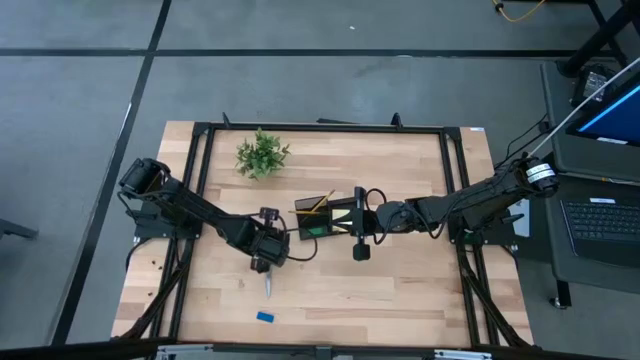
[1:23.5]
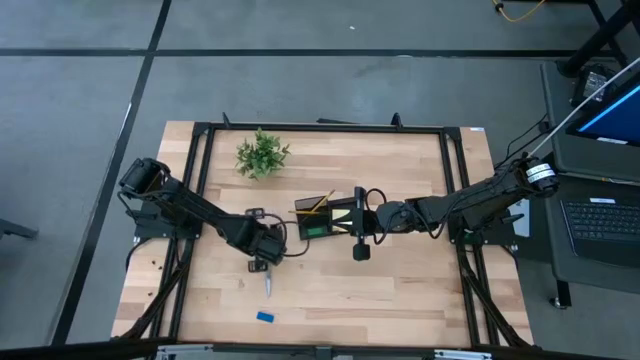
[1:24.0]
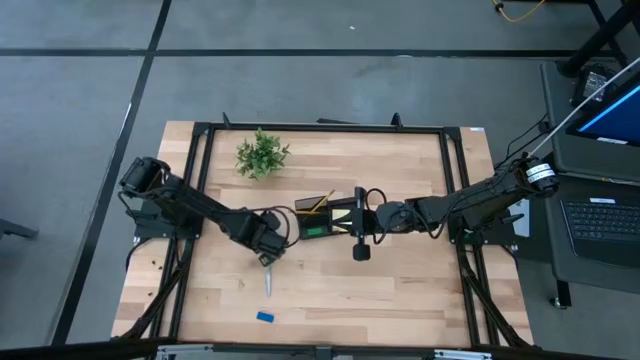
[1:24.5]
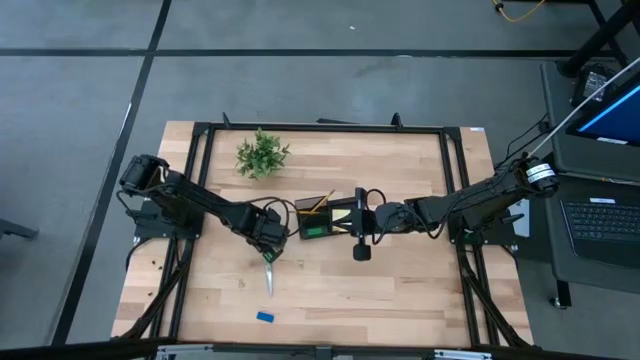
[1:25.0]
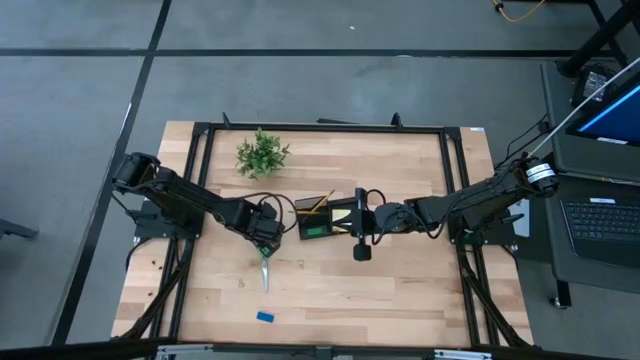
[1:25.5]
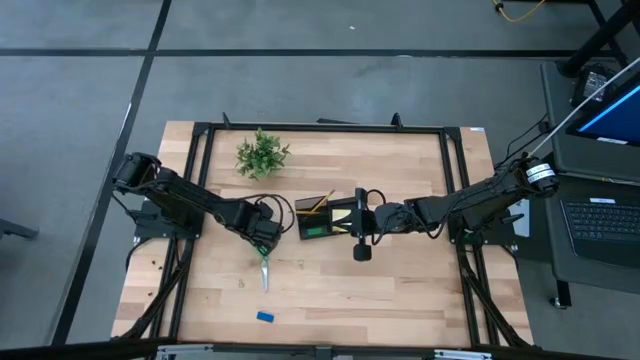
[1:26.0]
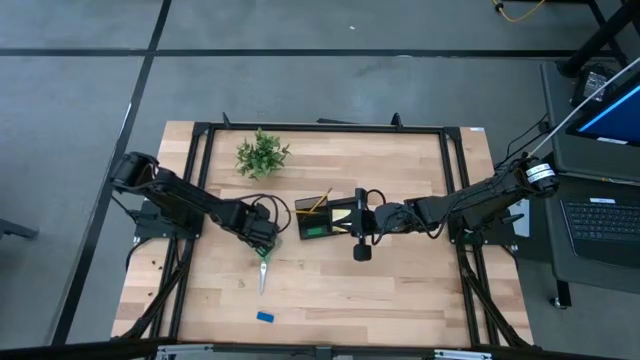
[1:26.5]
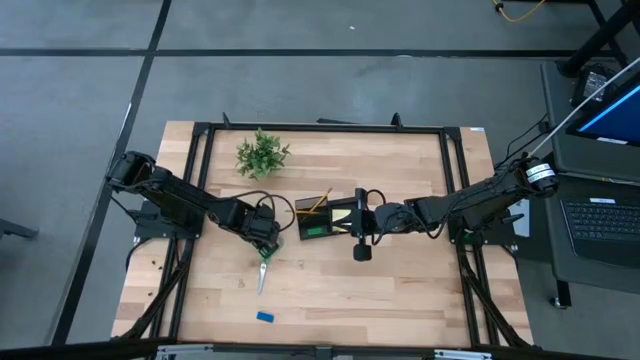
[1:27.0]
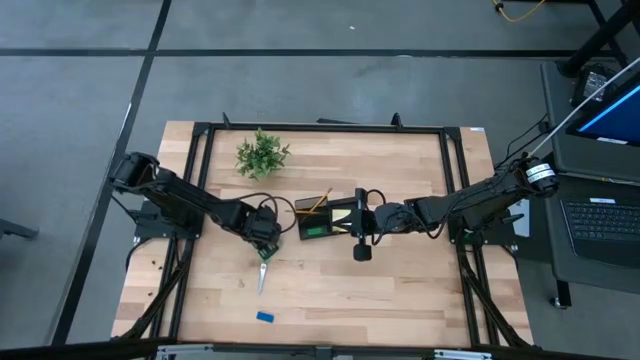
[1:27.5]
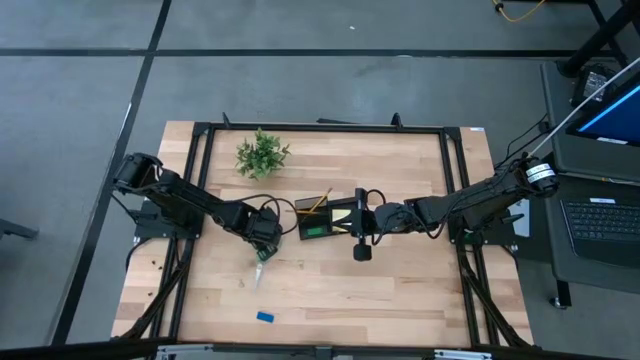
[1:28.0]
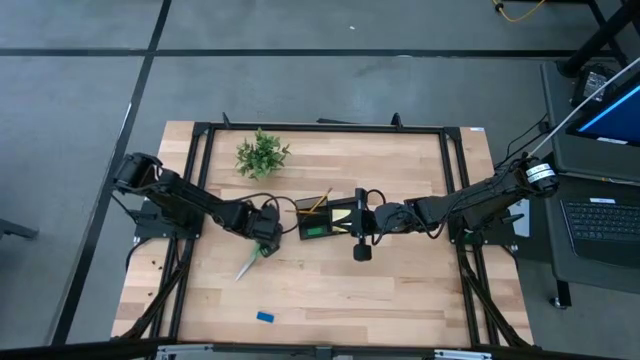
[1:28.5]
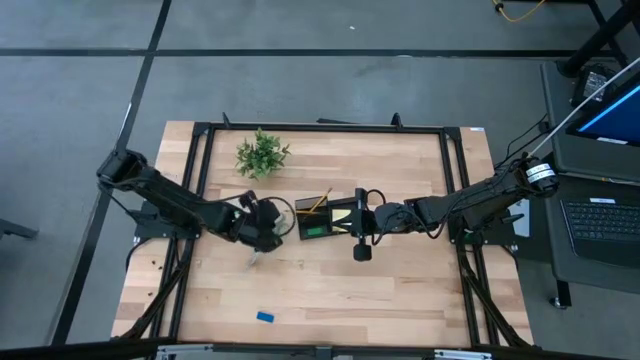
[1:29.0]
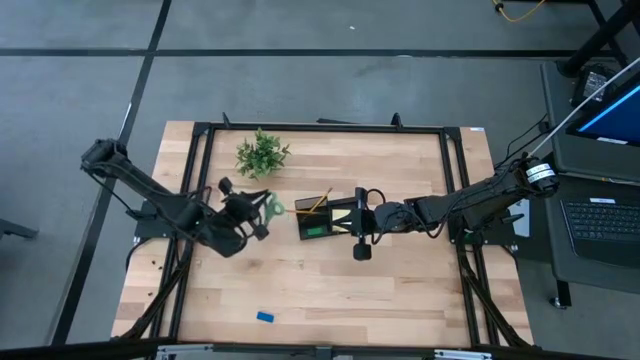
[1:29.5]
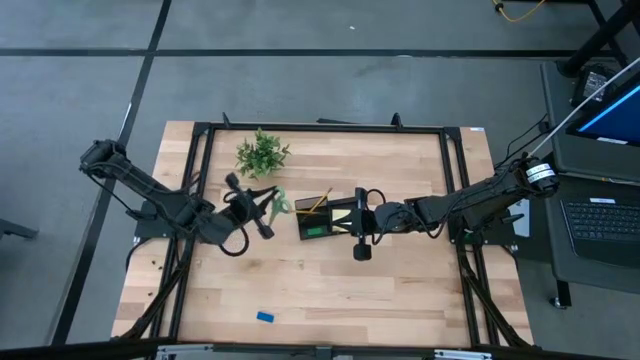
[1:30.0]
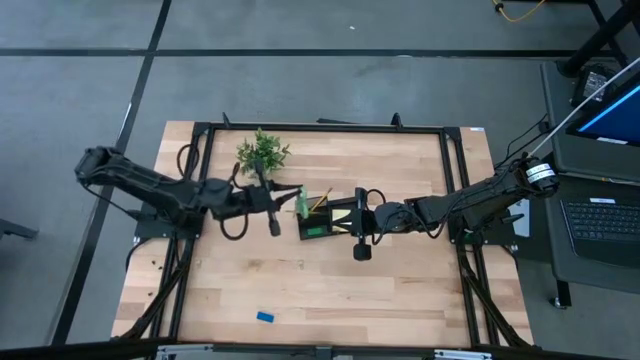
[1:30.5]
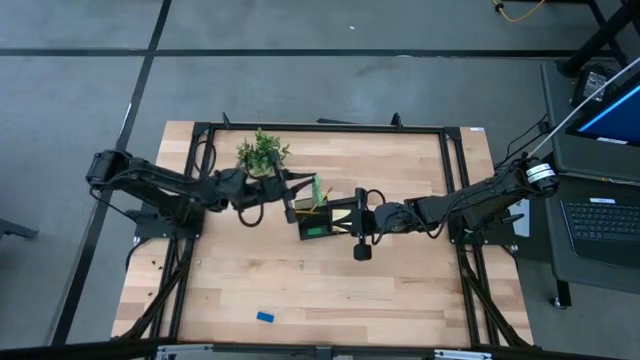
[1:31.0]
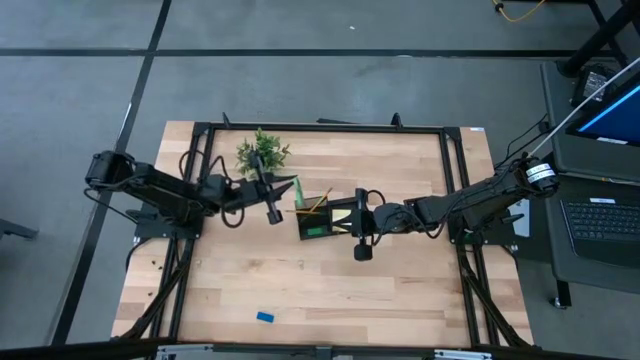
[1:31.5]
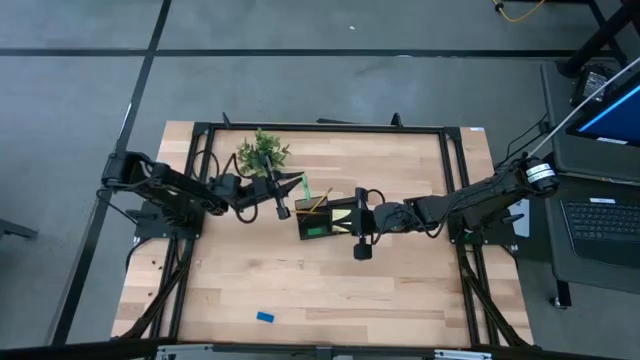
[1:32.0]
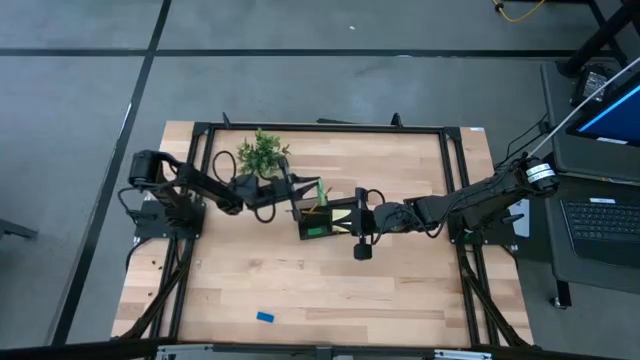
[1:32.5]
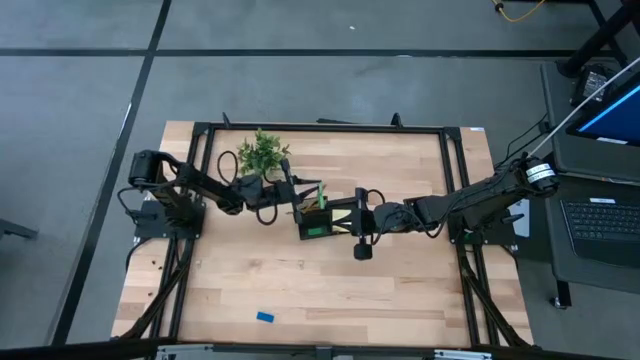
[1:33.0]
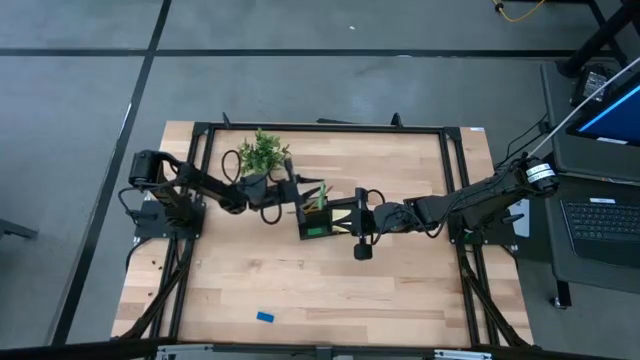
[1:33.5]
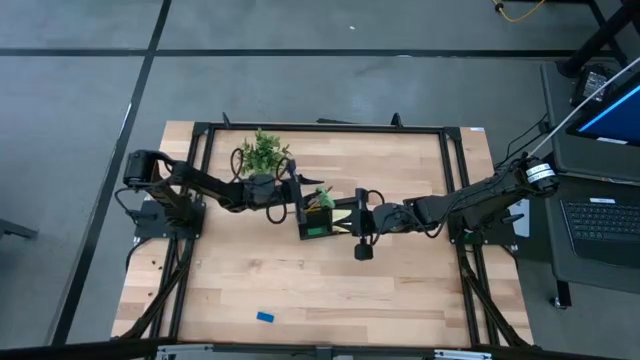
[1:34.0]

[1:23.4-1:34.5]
Task: Pick and place office supplies into organizer
Put the green scissors into the black desk organizer

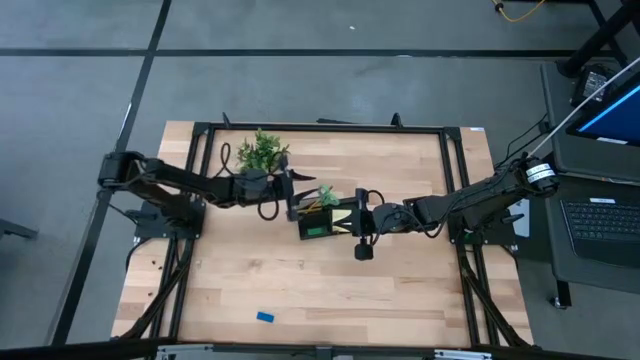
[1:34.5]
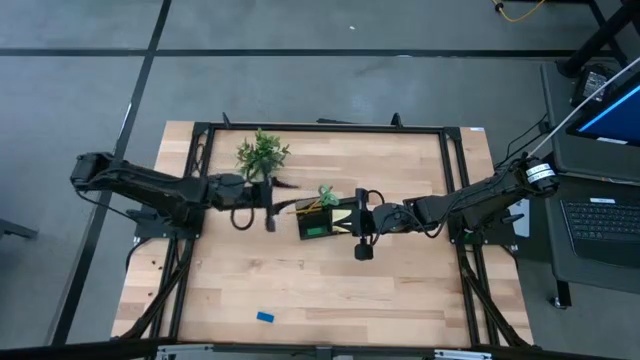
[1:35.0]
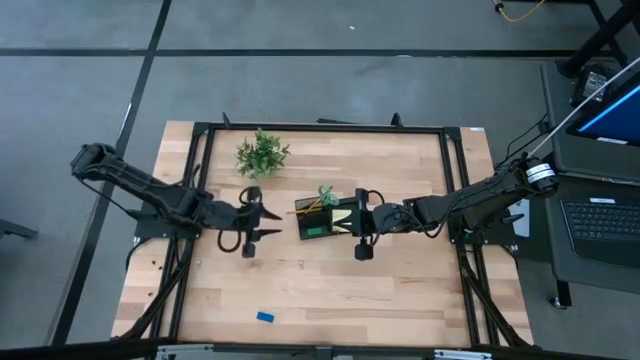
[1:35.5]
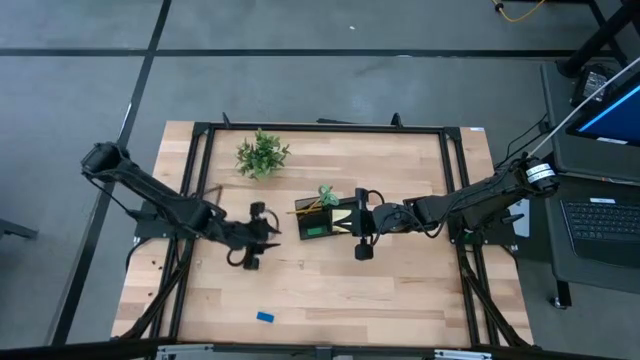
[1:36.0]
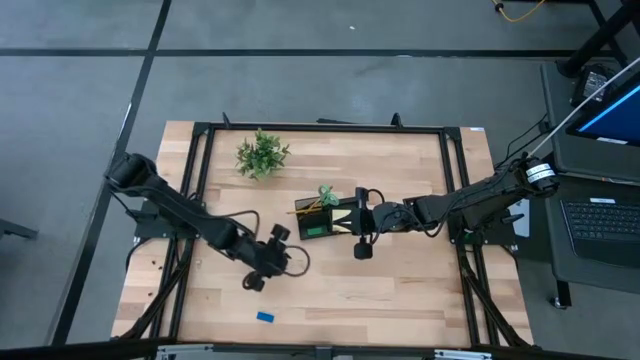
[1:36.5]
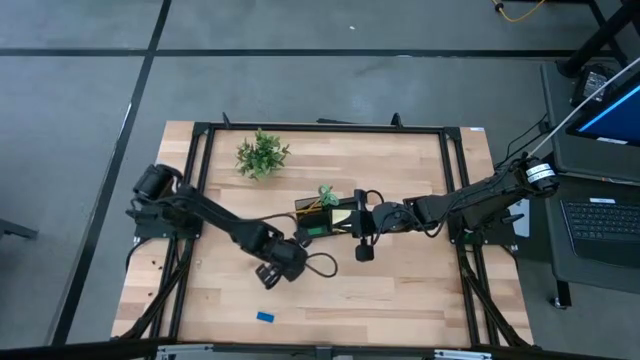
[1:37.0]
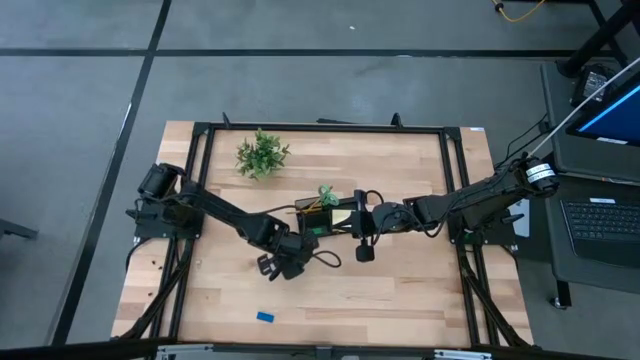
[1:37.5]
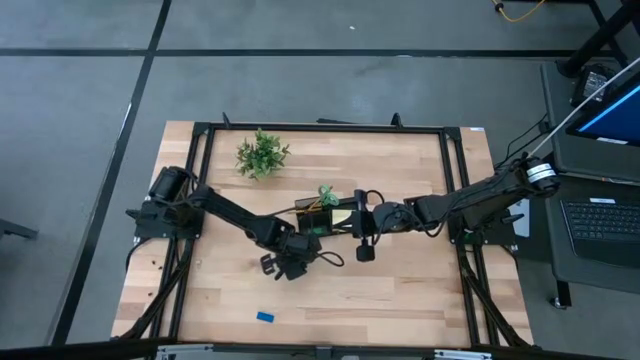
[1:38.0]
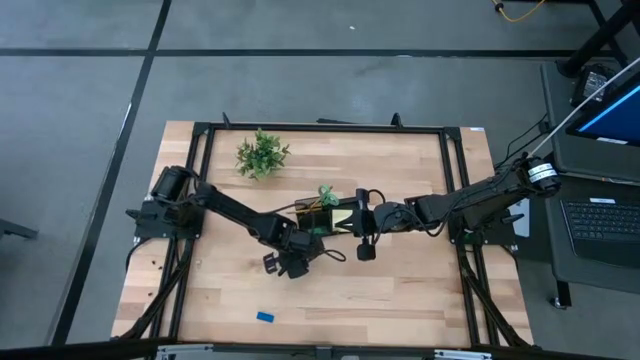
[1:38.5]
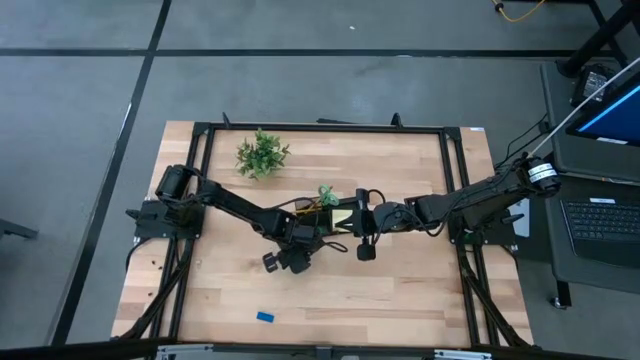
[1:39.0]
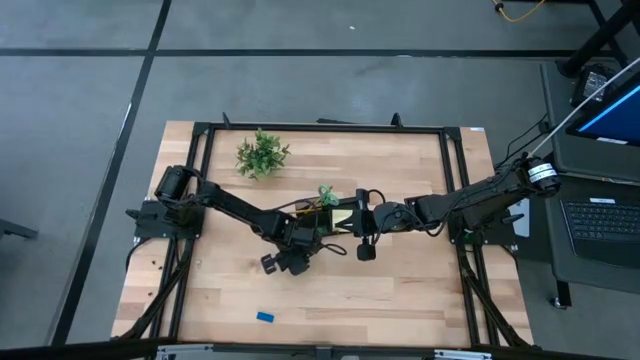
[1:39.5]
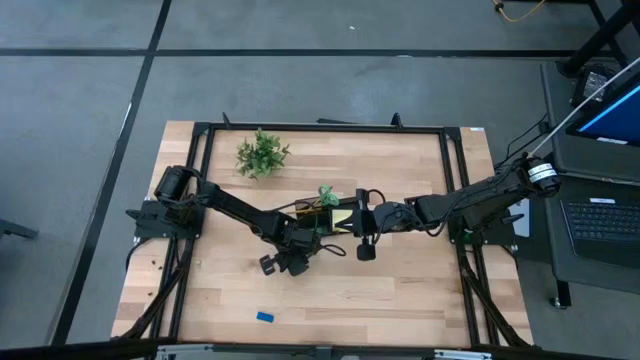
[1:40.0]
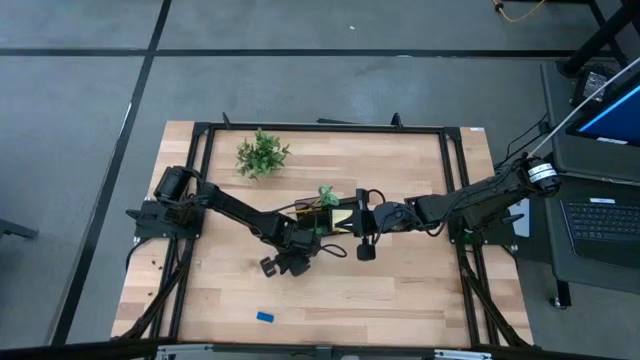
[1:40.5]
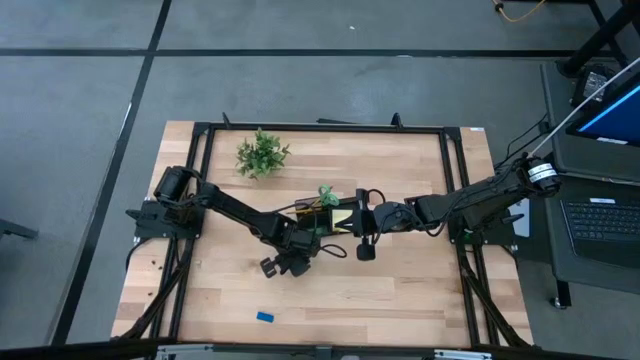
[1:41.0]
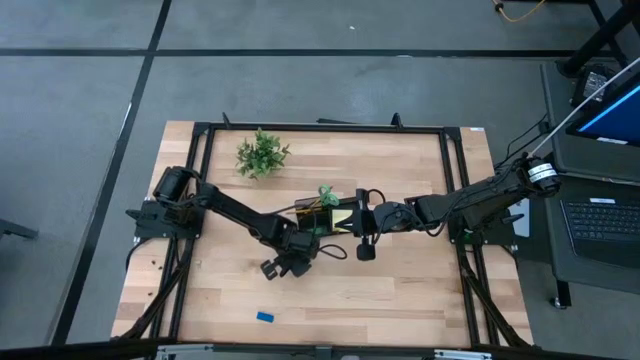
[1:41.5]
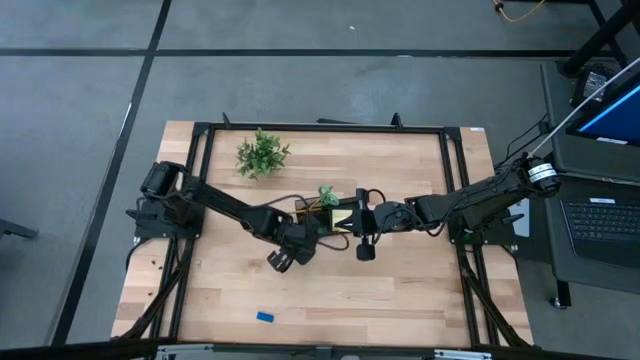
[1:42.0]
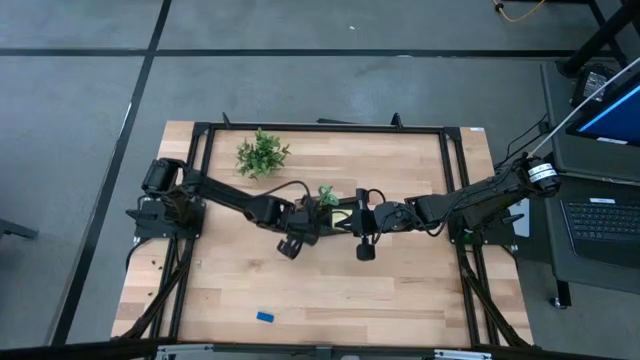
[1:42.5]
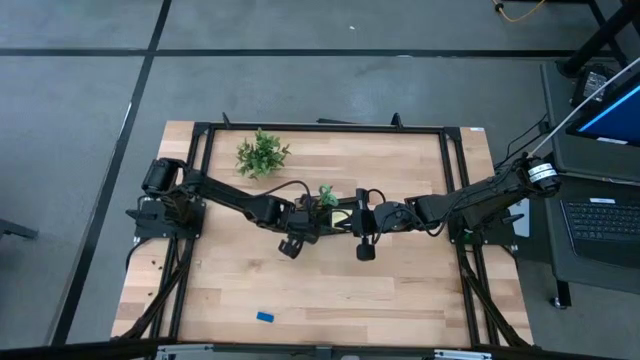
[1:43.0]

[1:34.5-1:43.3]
Put the right green binder clip into the black desk organizer
